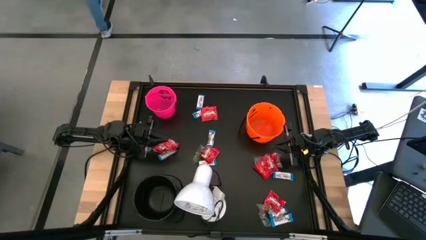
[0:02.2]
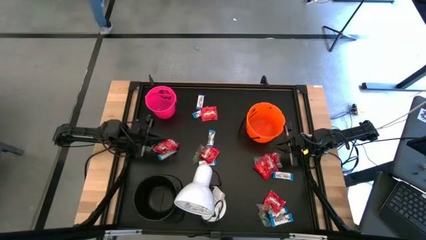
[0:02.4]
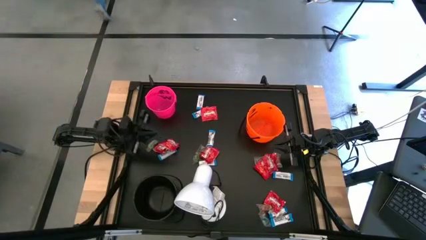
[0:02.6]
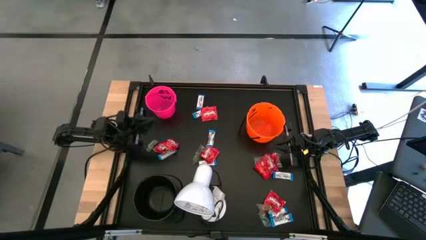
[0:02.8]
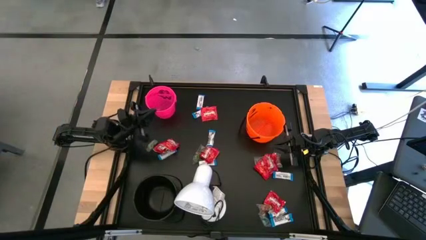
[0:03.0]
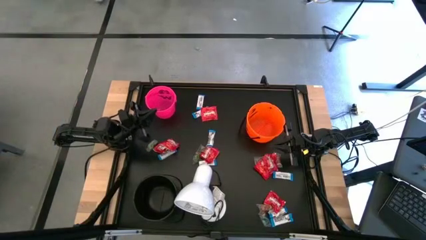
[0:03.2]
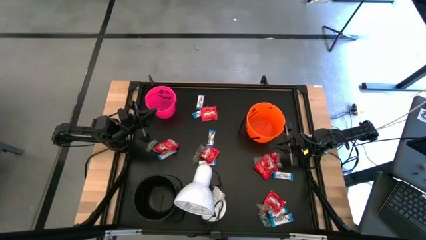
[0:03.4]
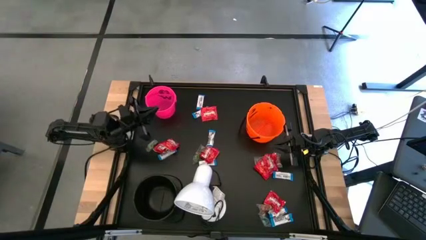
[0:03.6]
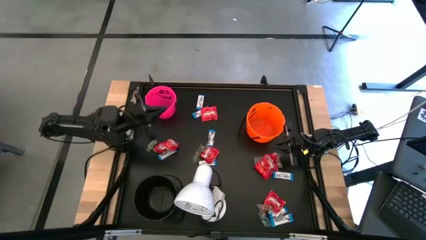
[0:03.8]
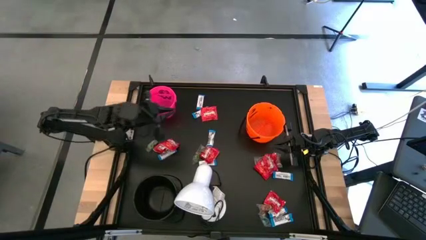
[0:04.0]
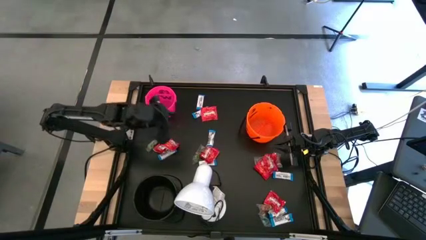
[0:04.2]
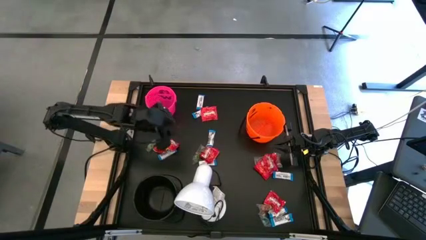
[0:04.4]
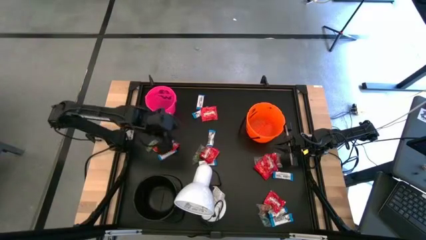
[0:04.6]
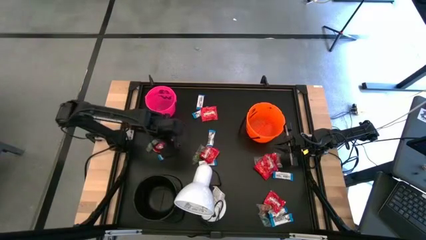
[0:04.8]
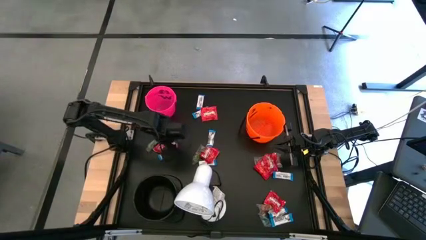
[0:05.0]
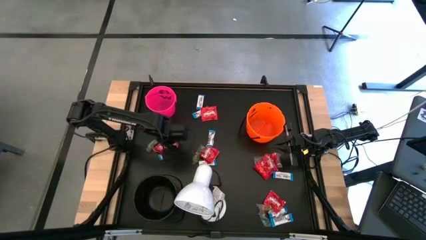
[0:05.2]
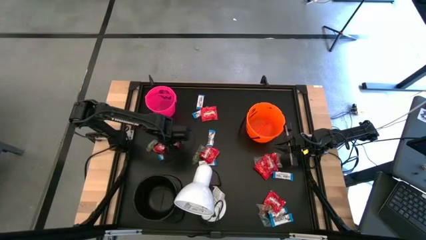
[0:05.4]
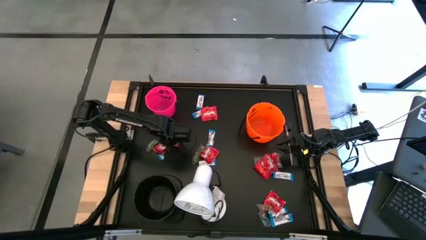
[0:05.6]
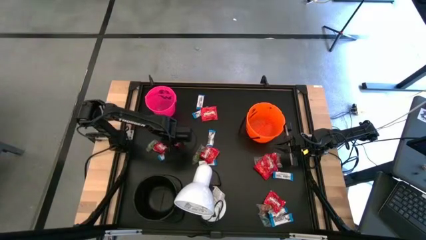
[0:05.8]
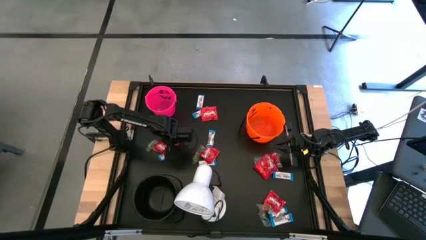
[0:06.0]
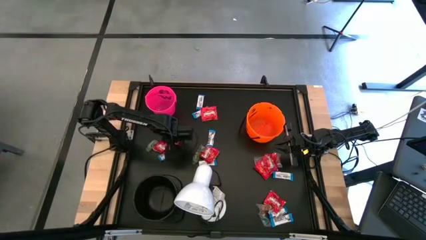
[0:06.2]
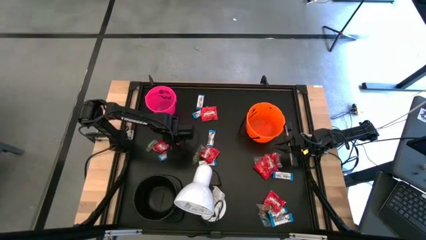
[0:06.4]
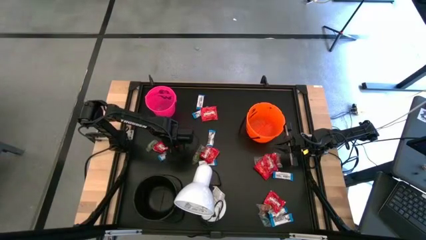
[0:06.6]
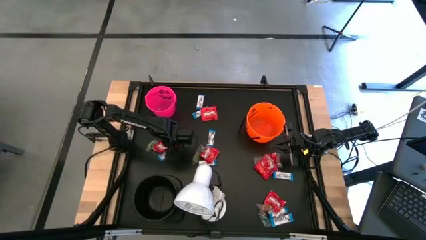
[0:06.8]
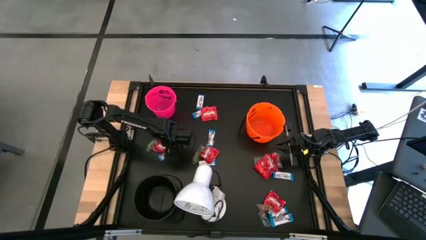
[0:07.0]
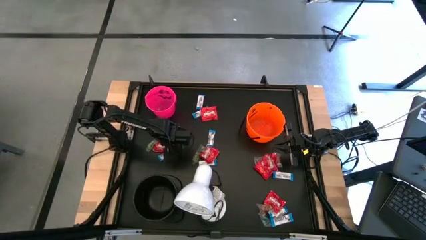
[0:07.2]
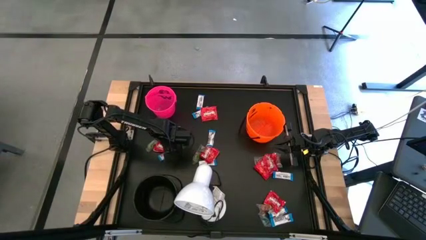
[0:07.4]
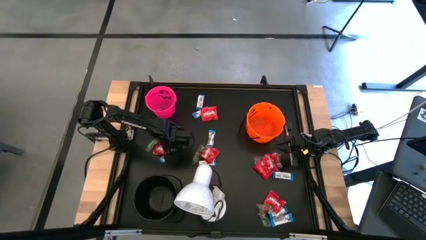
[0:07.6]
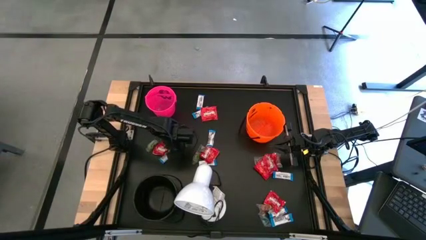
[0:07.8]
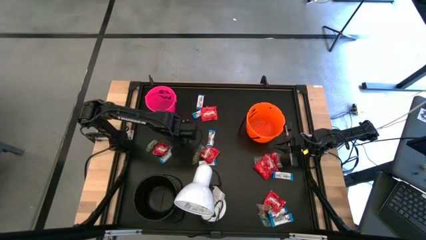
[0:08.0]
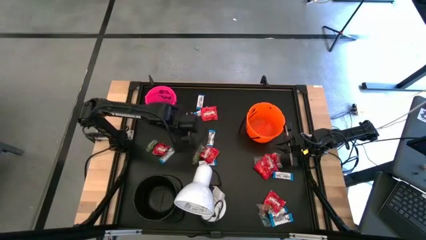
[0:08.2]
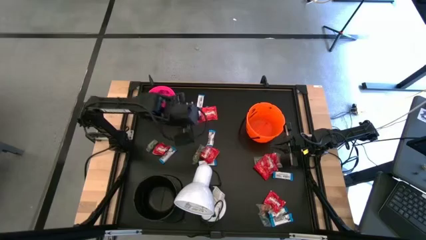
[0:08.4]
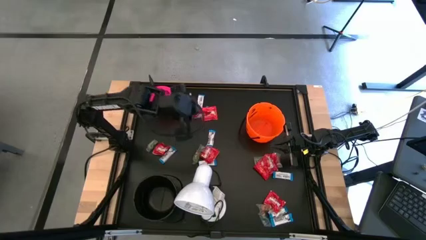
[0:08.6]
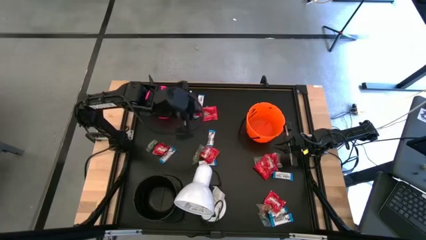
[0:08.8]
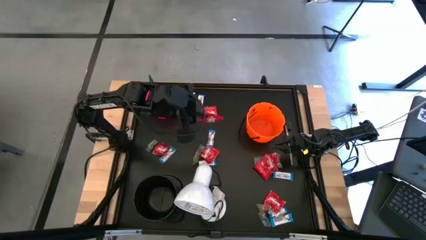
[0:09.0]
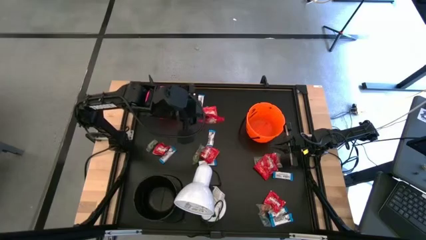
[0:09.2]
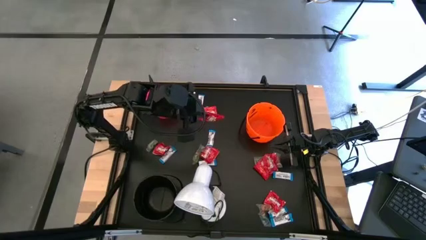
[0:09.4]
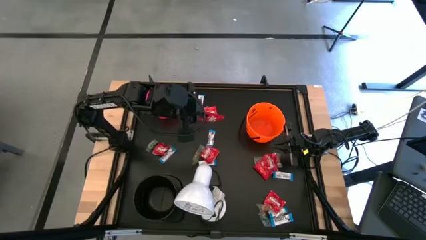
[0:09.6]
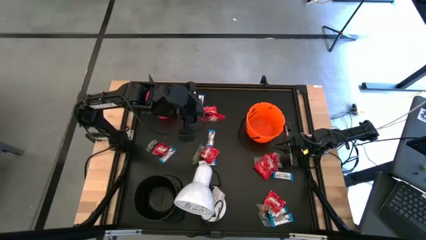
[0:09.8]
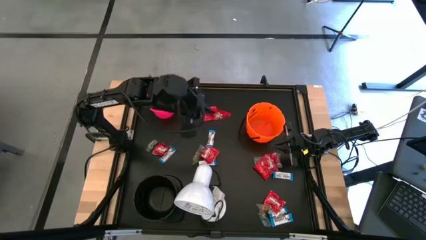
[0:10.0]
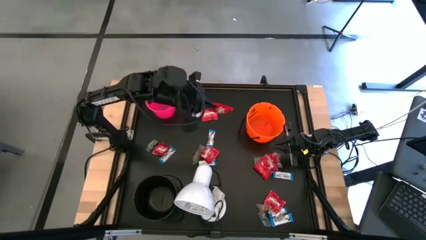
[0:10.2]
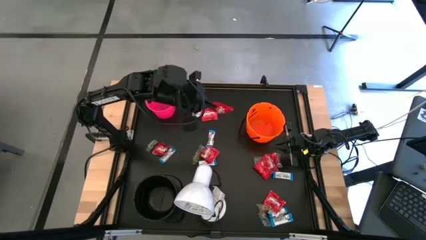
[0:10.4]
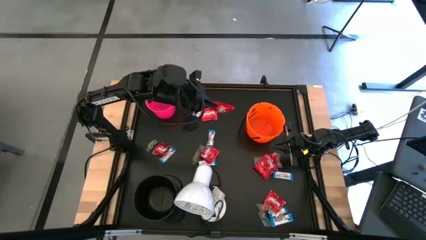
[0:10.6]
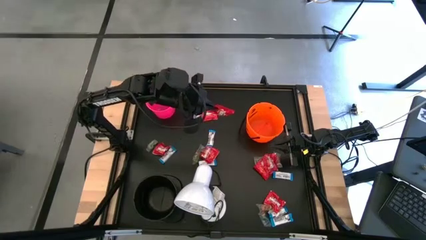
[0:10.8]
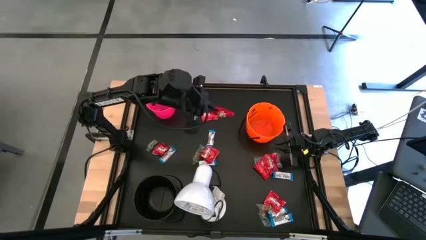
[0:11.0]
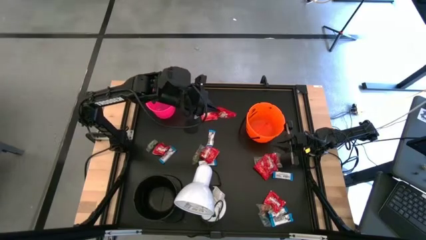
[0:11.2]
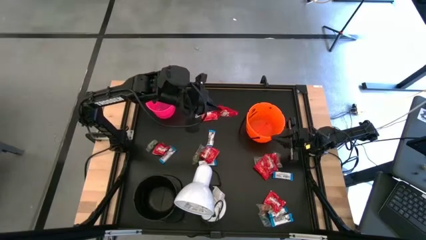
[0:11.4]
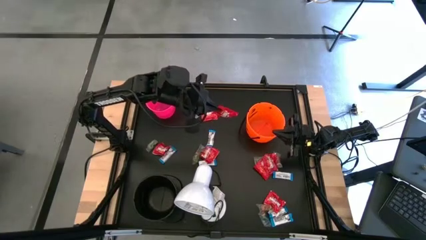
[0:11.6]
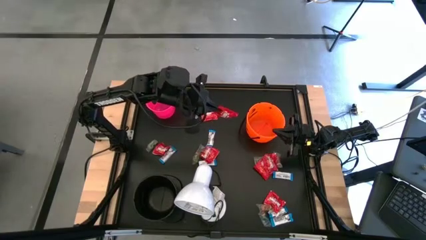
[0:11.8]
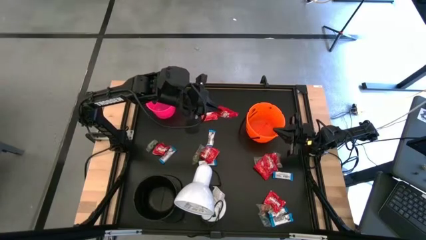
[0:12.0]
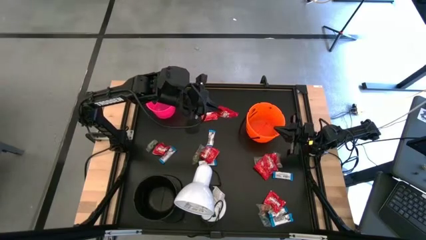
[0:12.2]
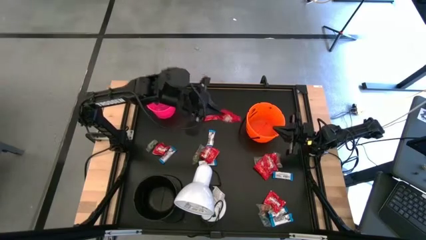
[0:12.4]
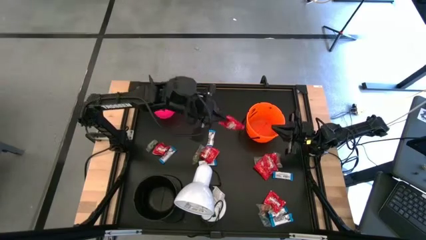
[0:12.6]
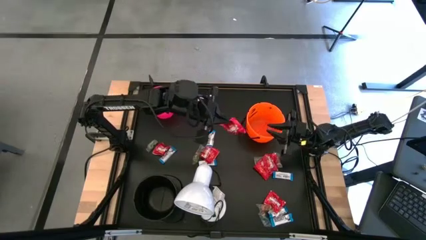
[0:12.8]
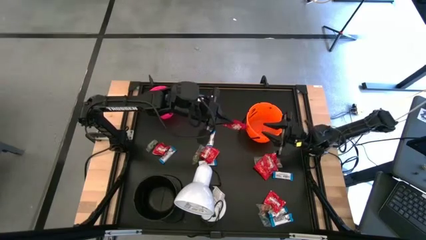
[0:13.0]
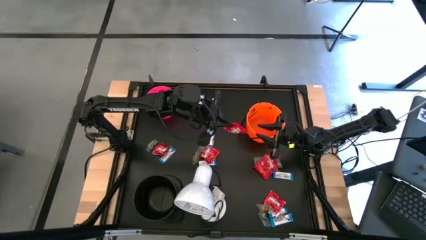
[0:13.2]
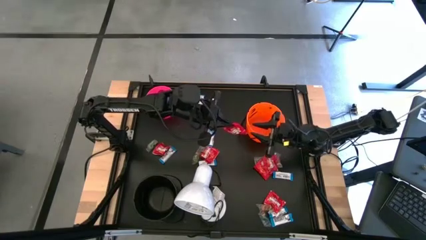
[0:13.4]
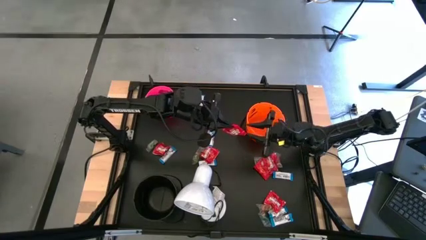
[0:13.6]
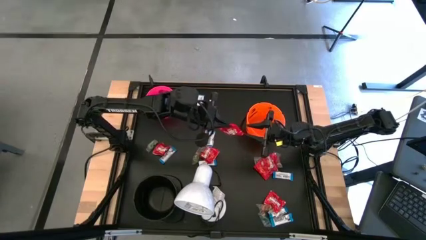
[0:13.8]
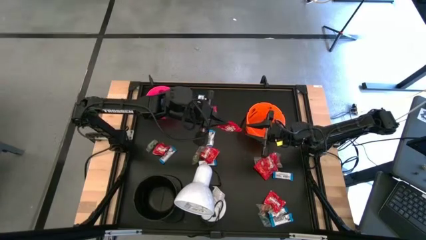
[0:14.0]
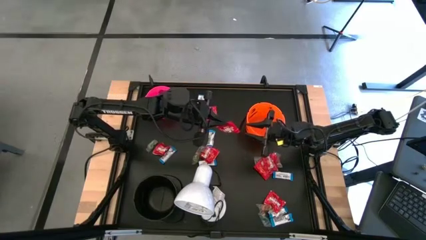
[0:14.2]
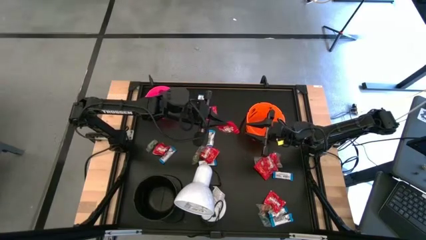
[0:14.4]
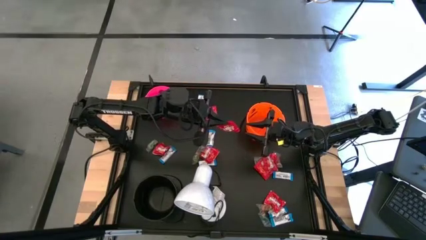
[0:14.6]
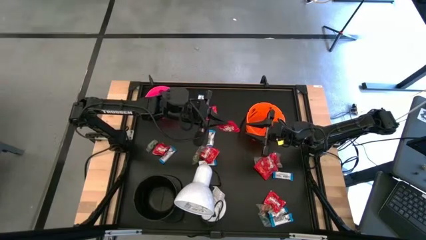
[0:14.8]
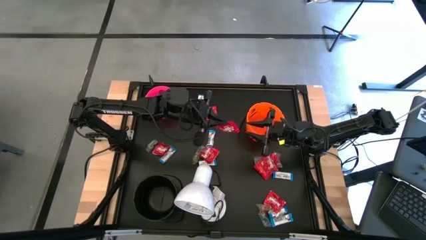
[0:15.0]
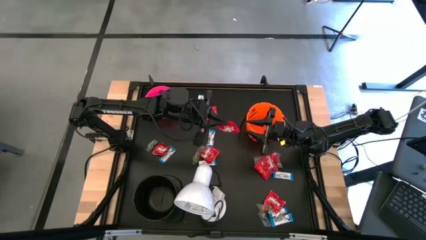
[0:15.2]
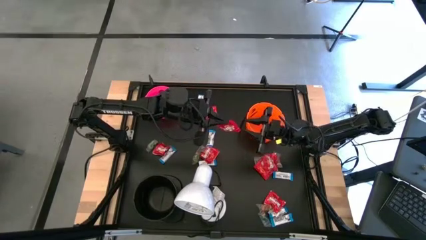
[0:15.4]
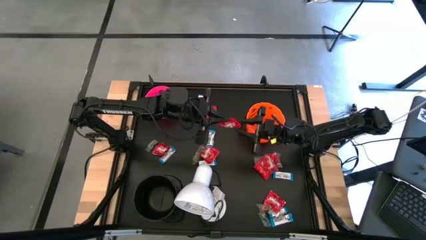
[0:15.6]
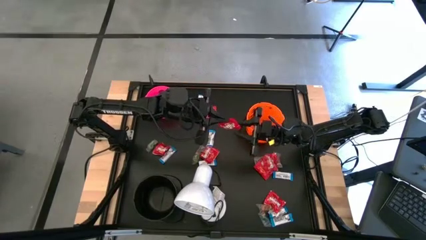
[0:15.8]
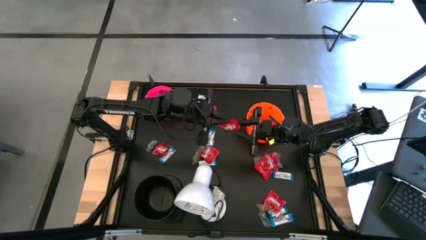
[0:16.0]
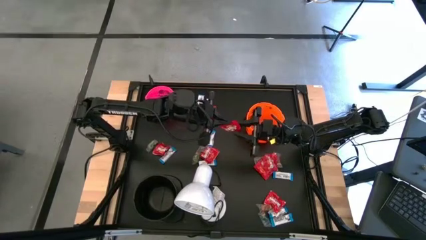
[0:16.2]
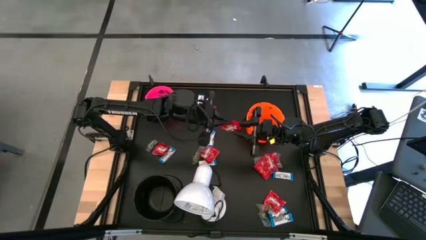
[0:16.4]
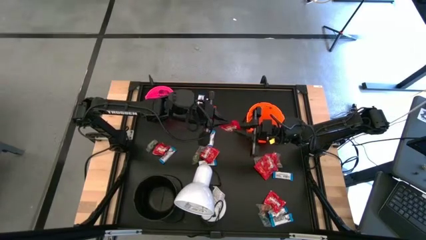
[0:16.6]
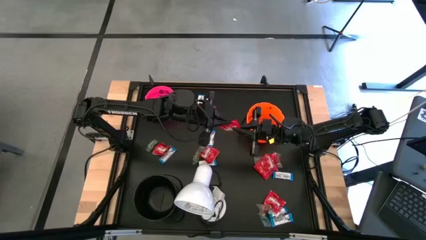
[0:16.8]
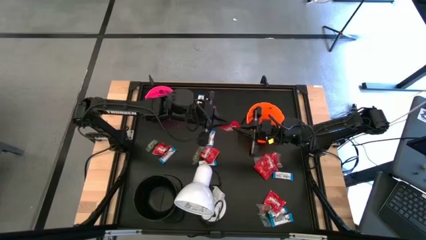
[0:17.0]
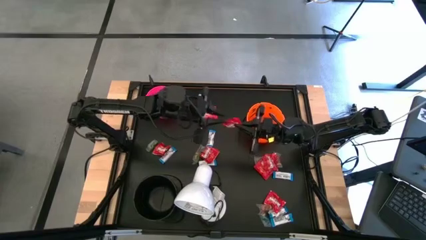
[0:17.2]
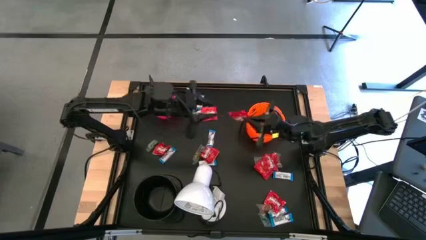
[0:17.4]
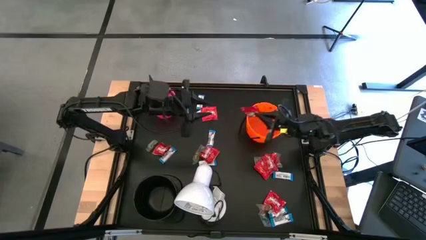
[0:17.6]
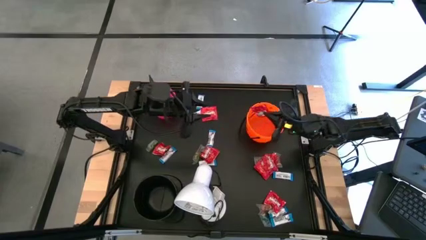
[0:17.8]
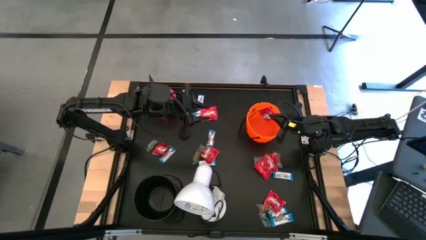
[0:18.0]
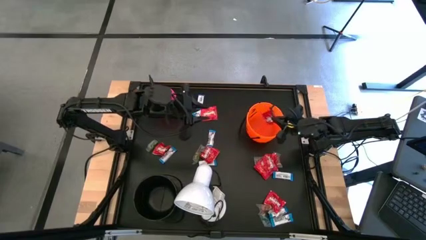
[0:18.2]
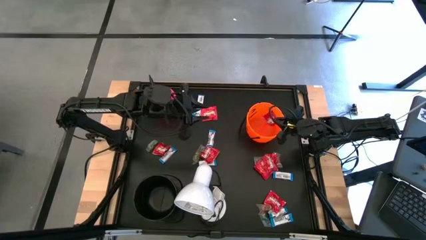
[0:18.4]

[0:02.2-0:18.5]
Task: Sort candy
Put the red candy into the orange bucket
